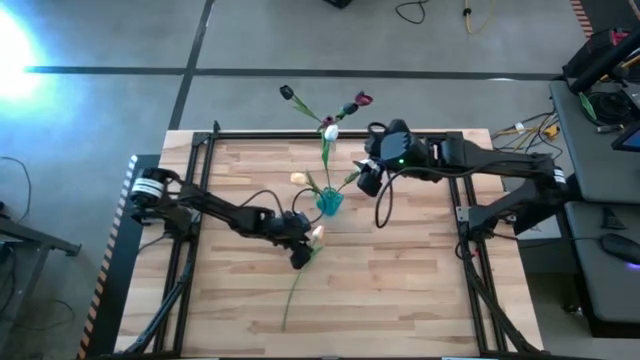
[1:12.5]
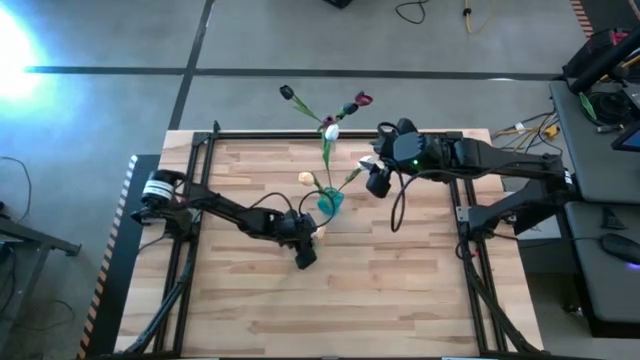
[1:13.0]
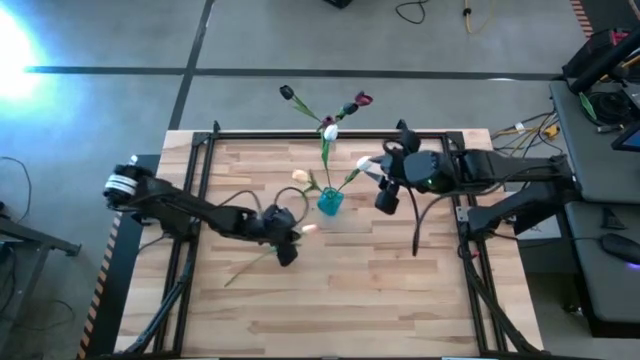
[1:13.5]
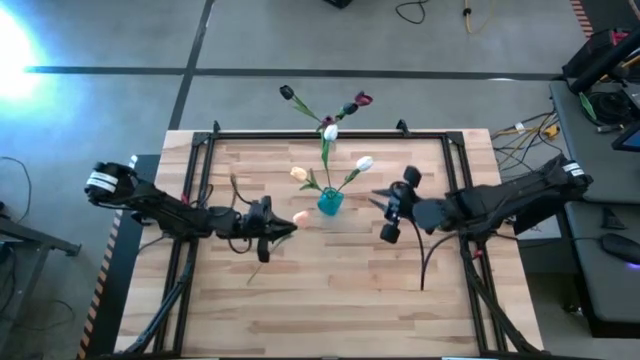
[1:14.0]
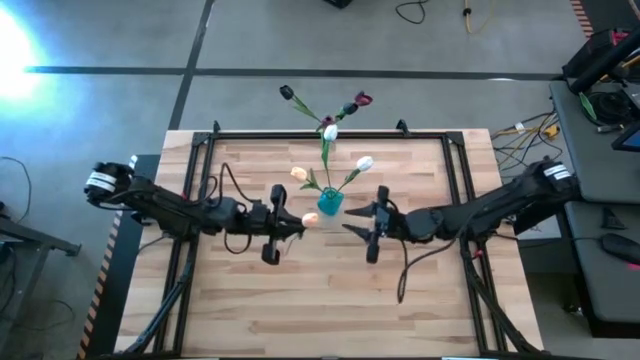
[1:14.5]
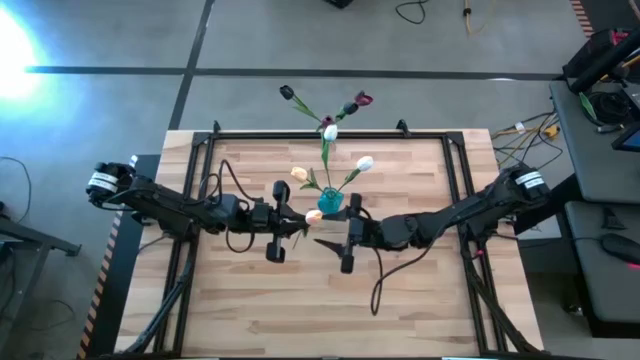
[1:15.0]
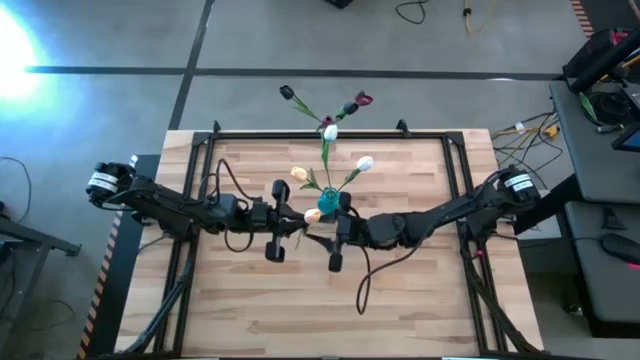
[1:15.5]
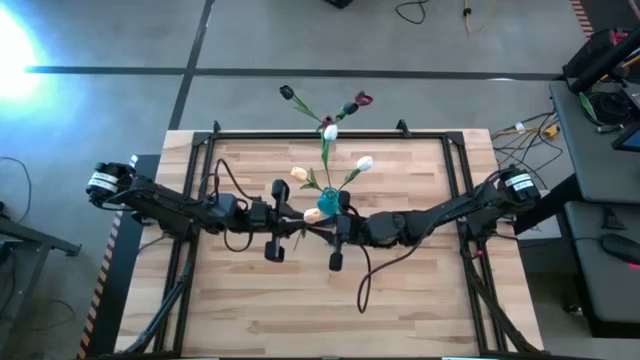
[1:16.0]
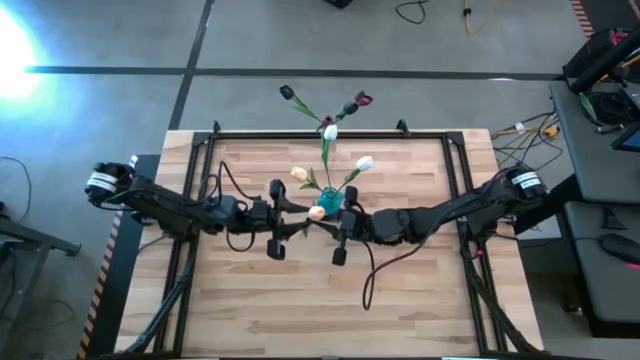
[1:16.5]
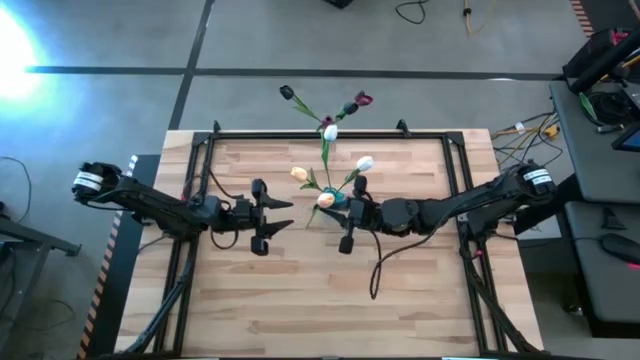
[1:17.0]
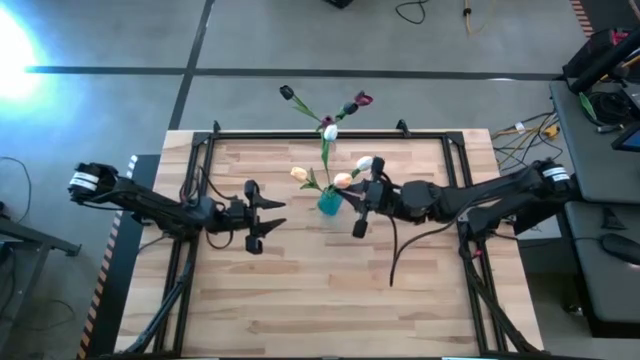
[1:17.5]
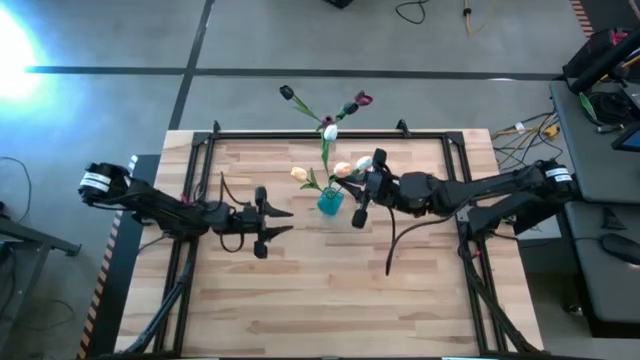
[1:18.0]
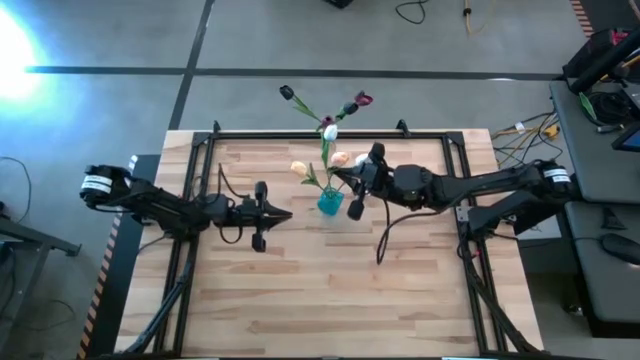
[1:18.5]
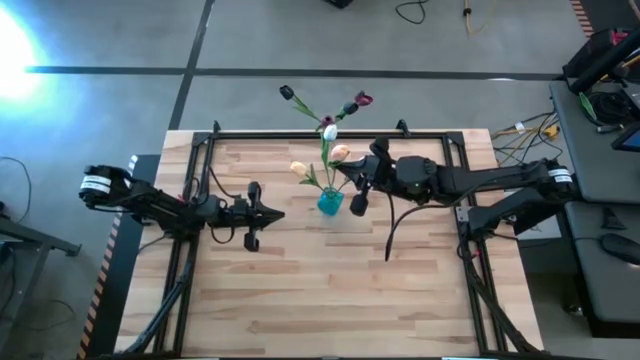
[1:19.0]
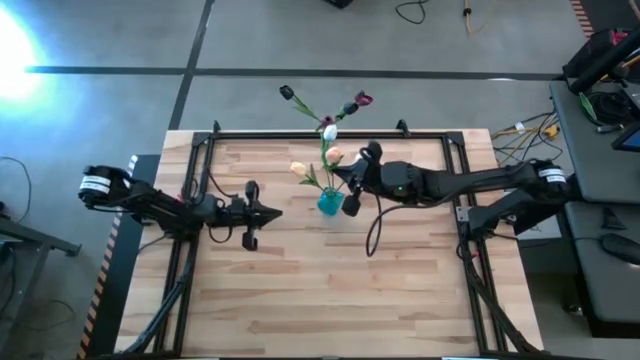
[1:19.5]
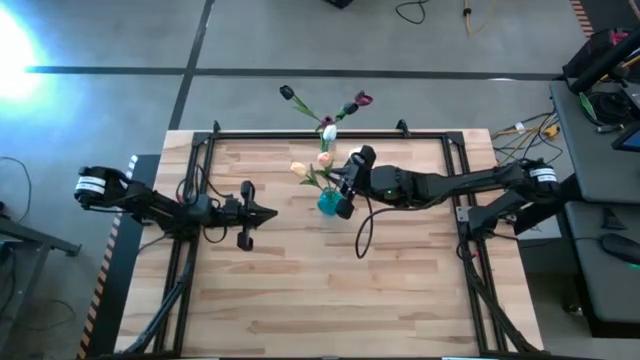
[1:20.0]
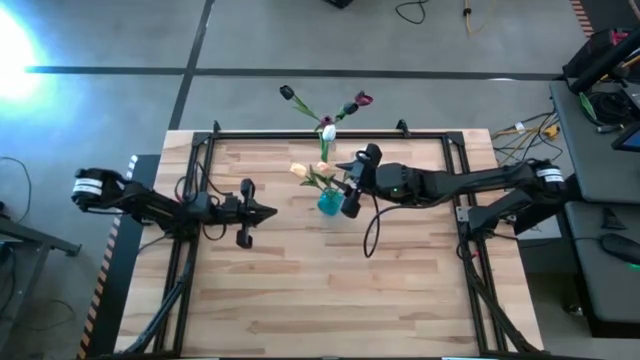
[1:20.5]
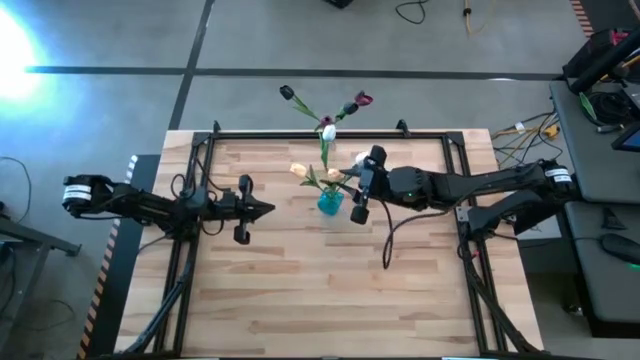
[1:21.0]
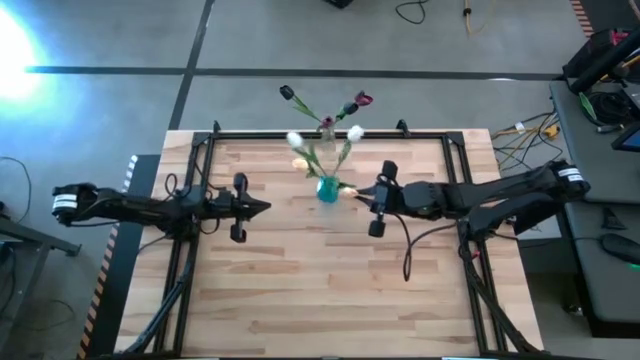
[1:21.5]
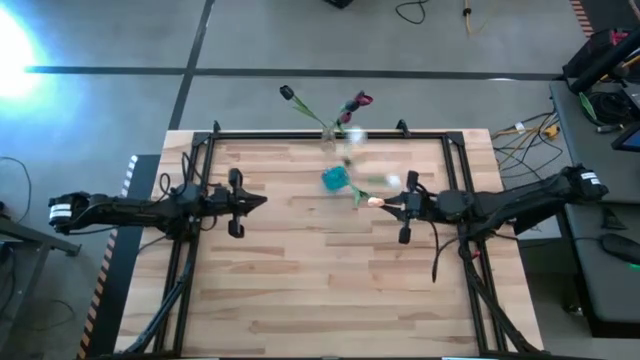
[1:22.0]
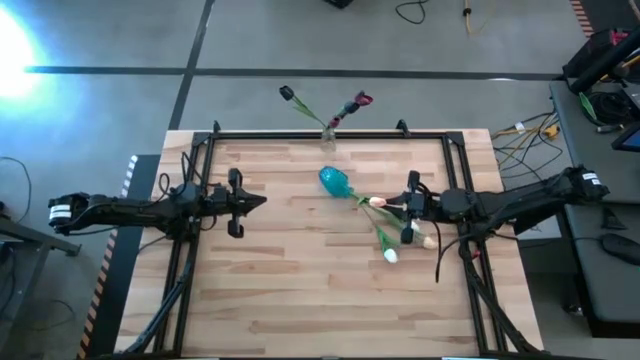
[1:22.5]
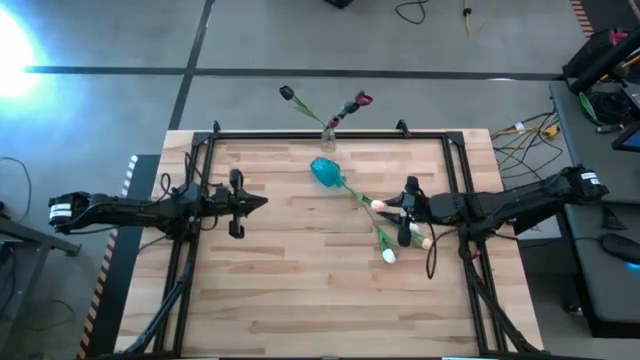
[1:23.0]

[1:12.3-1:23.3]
Task: Sort flowers into vase by color
Put the orange tulip into the blue vase

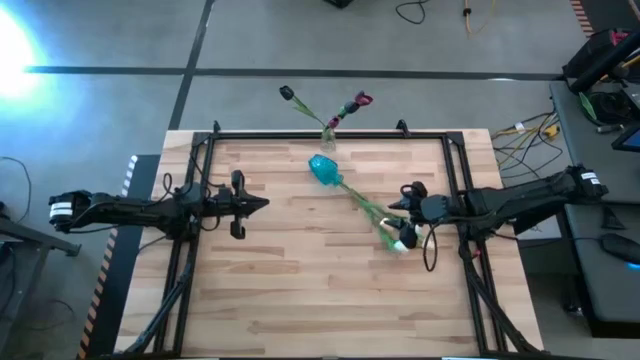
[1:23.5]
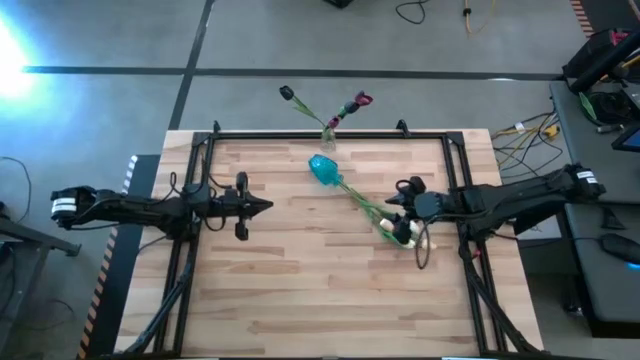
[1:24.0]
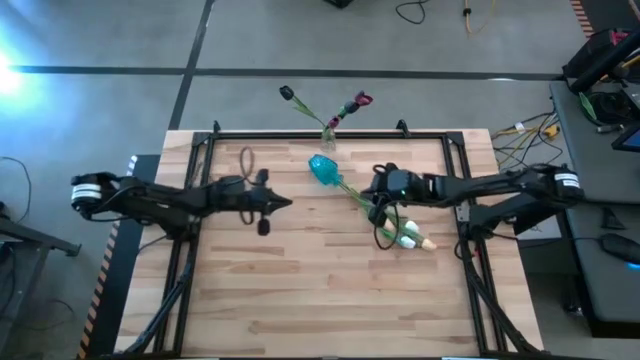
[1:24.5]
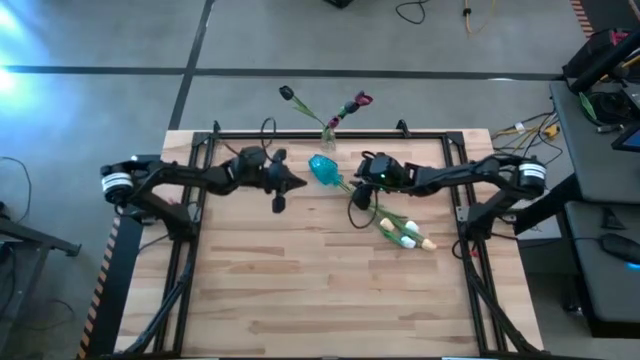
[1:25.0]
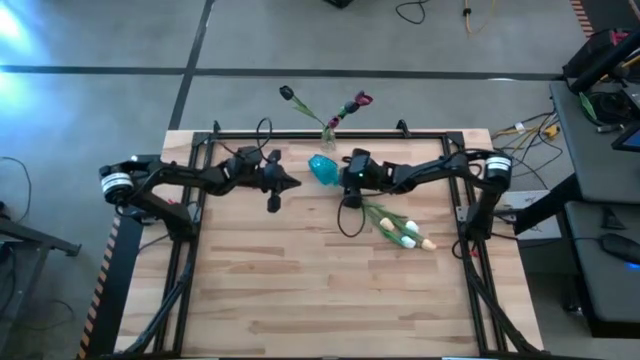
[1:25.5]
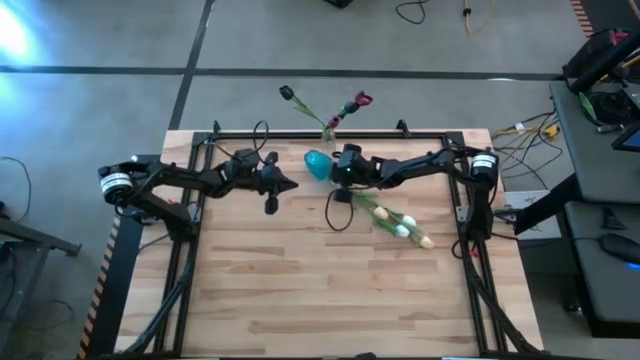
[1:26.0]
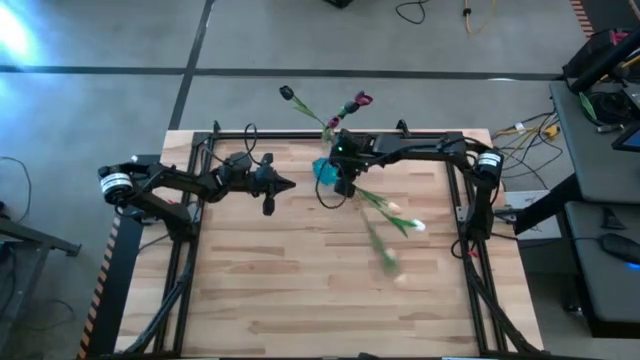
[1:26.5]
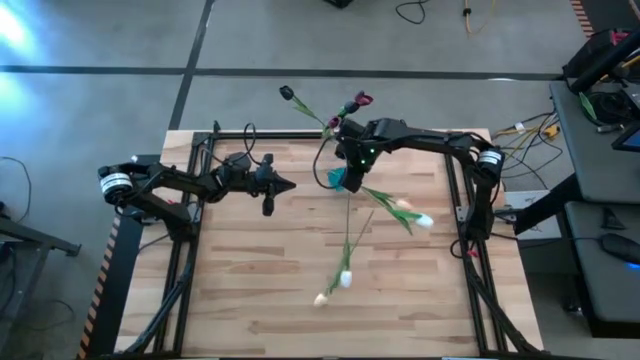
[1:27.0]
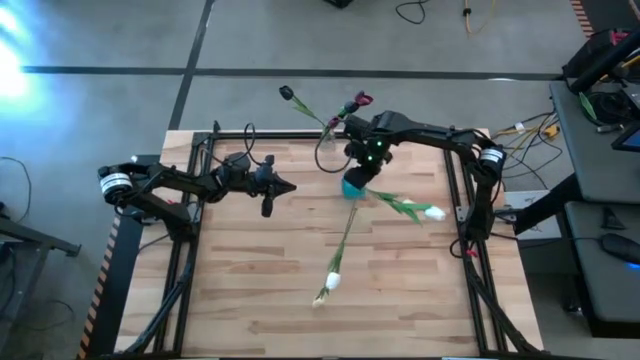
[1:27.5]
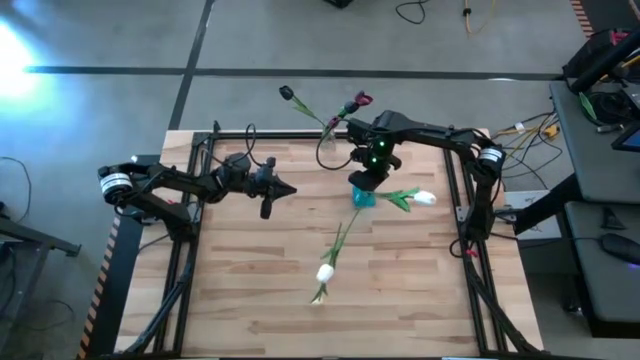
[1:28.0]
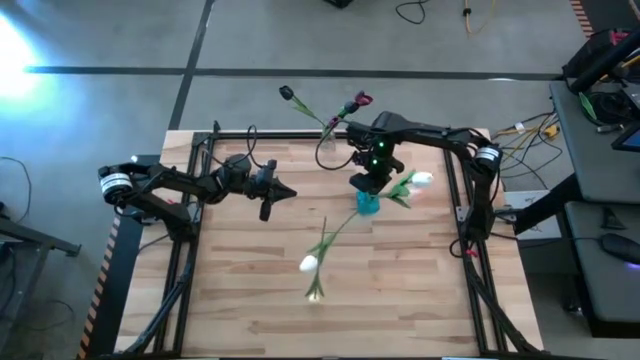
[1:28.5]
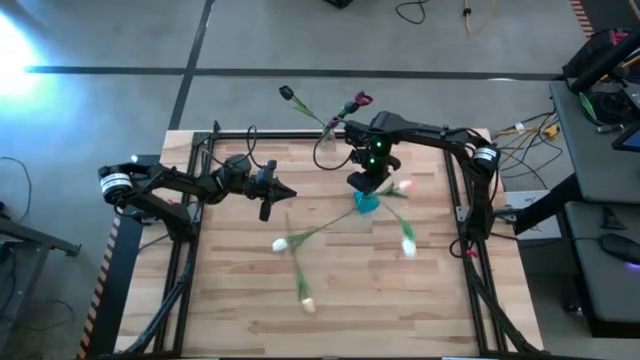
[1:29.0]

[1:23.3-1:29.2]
Adjust the blue vase

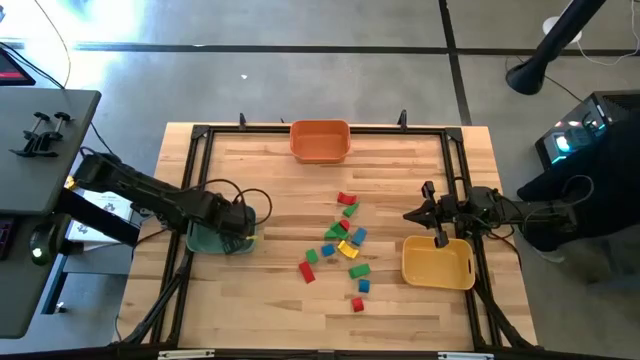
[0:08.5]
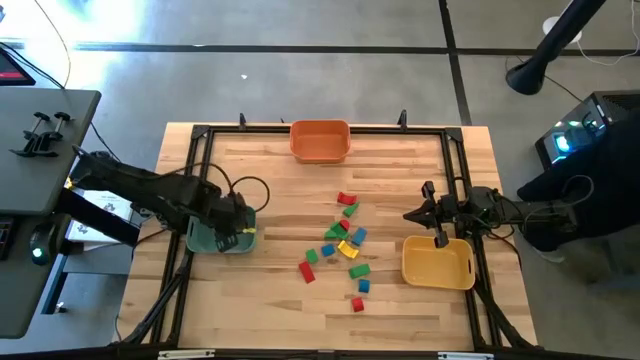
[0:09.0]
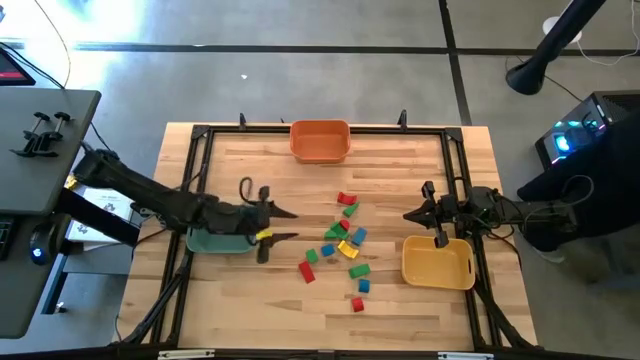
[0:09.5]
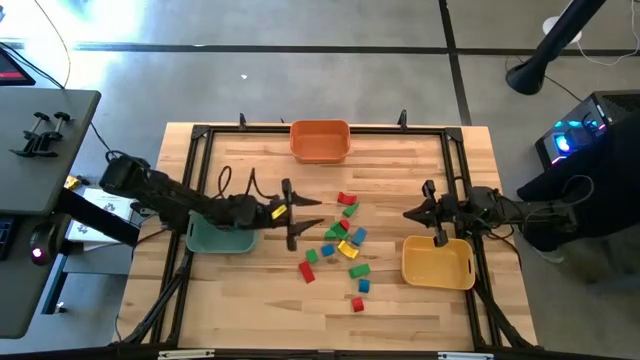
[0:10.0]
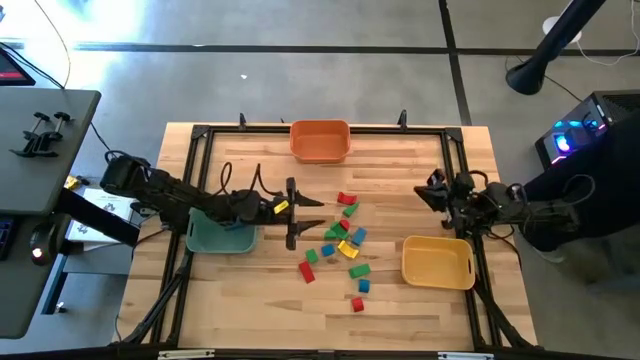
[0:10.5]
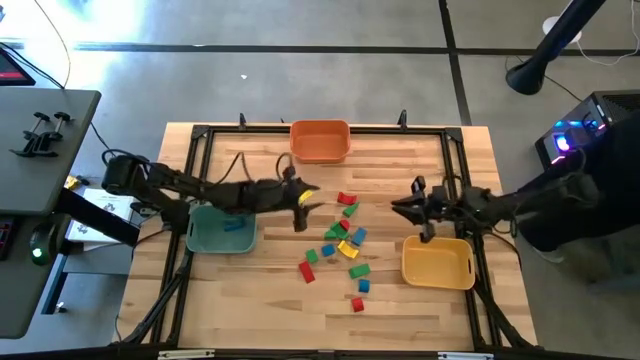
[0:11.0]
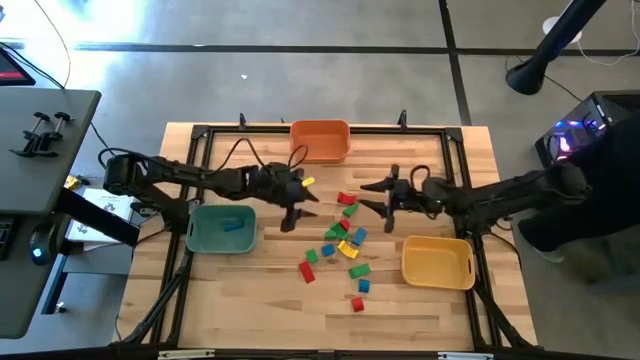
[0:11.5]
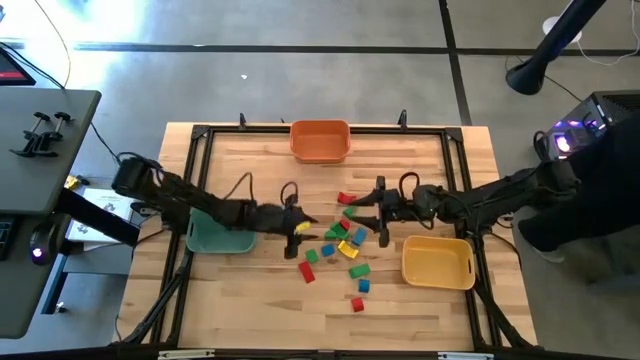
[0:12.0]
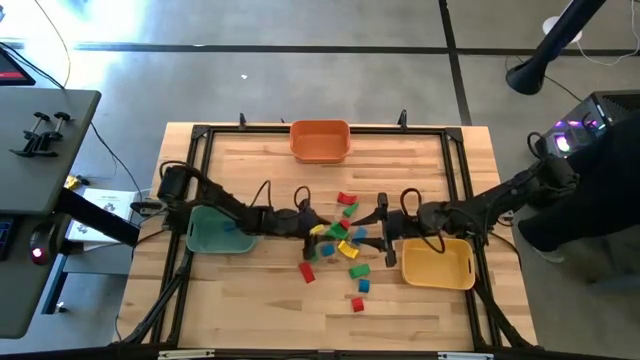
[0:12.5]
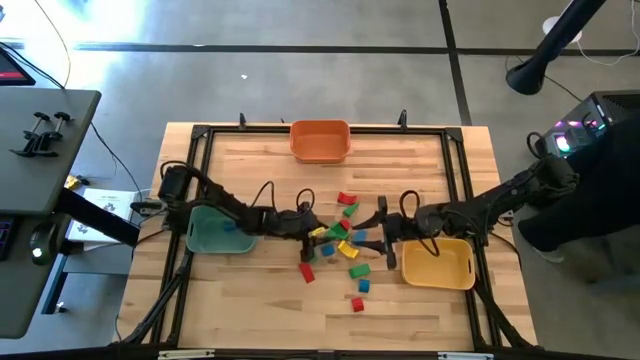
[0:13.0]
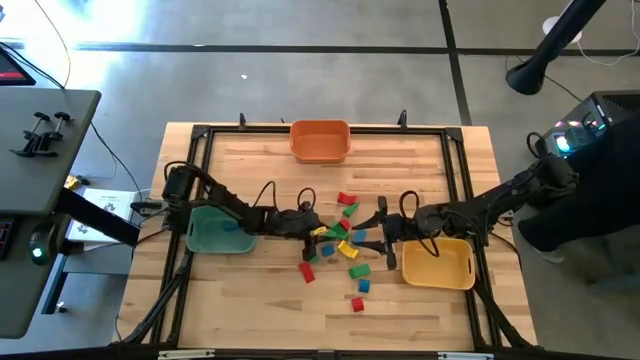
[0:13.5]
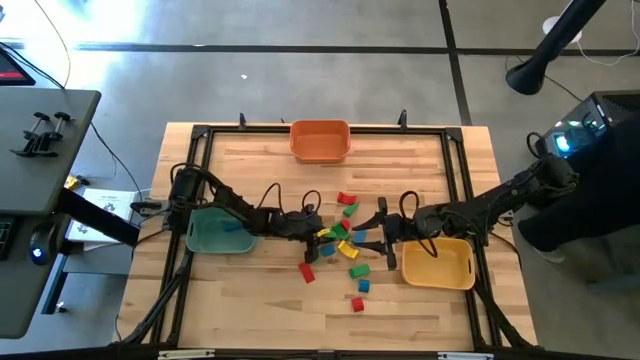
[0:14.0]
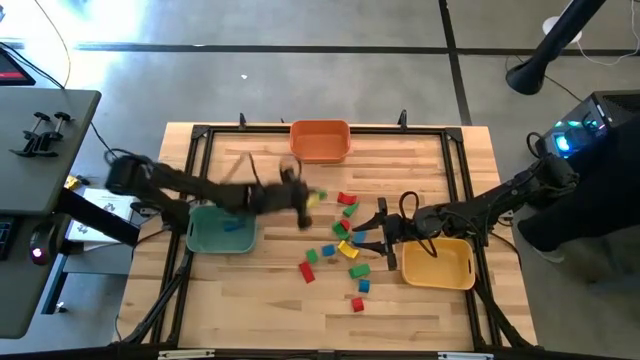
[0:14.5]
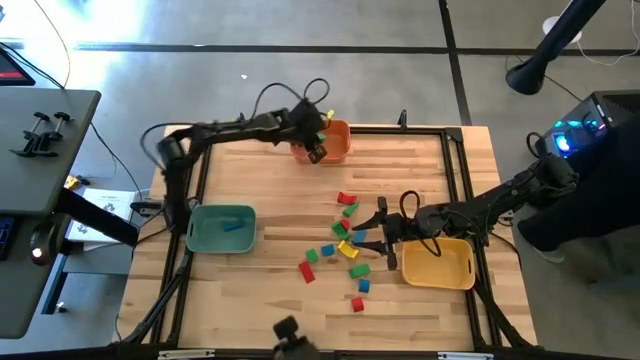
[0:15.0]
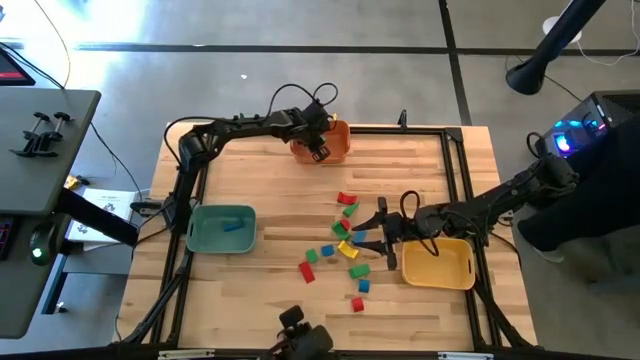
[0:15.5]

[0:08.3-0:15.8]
Task: Sort blocks by size
Put the green half cylindrical block into the orange bin
